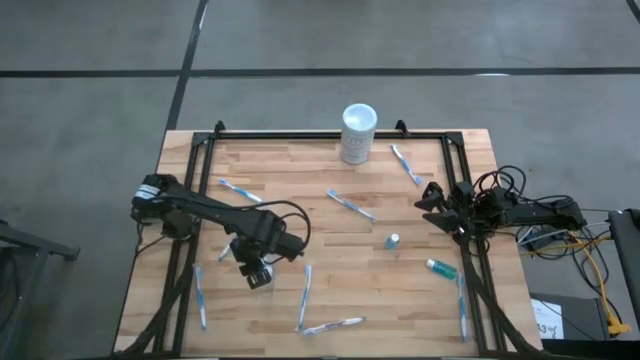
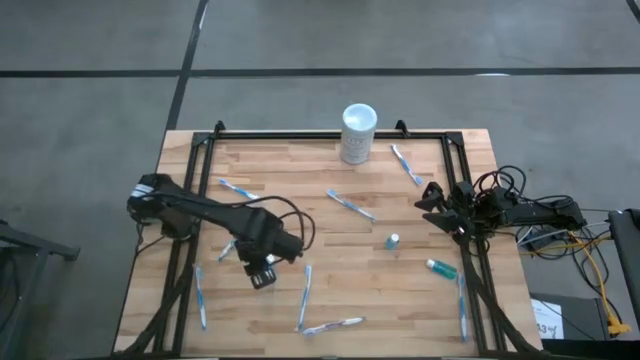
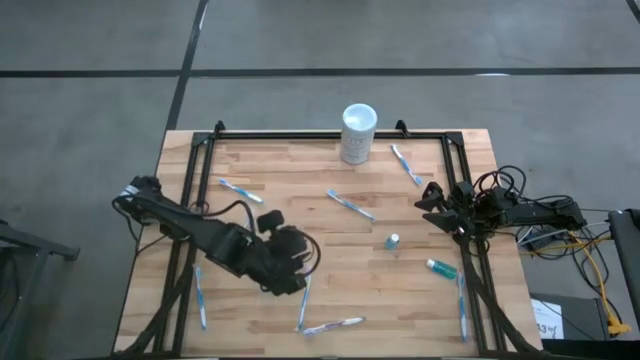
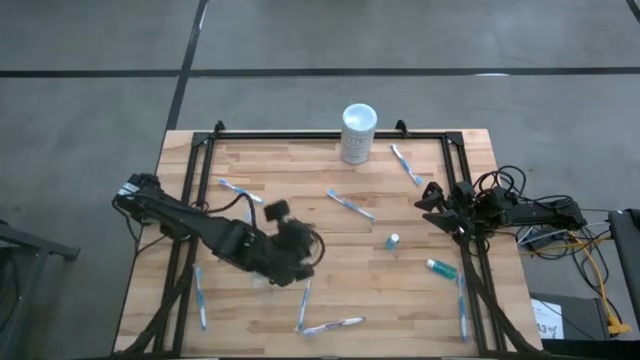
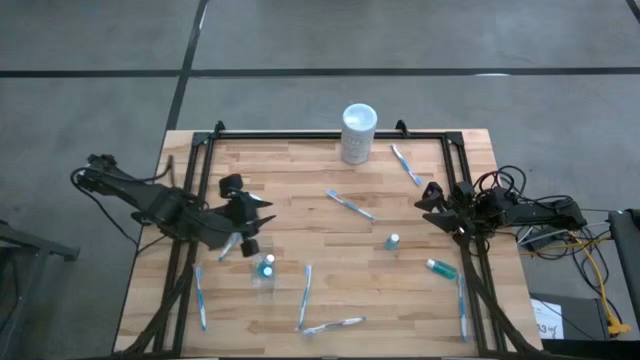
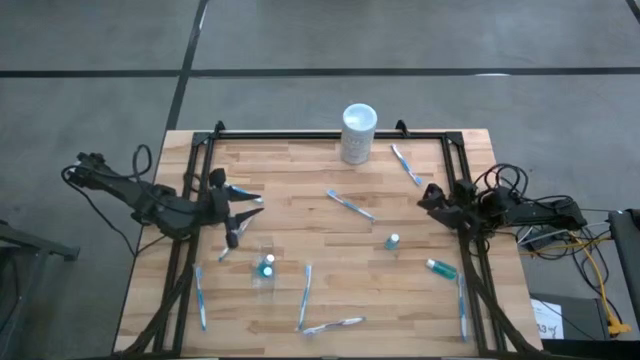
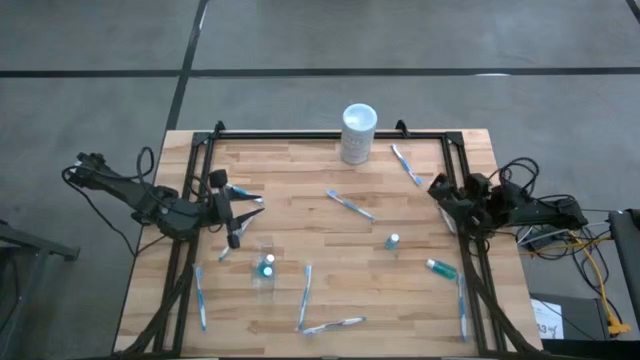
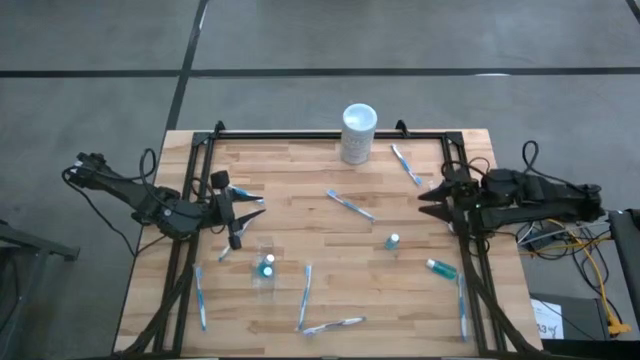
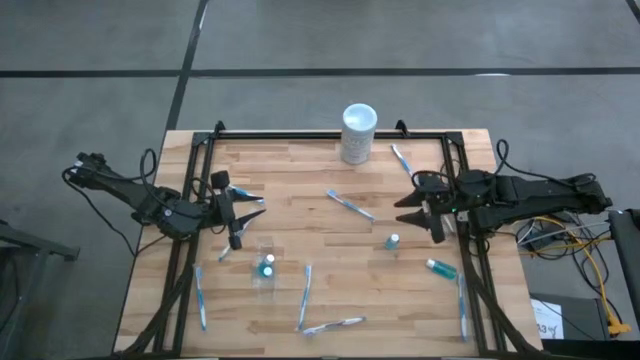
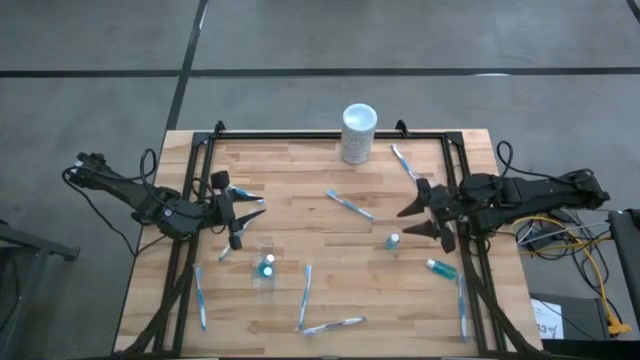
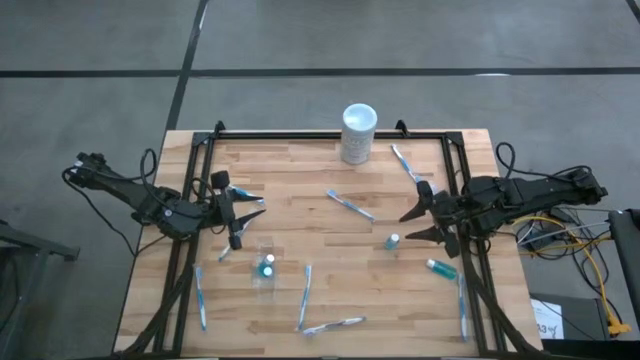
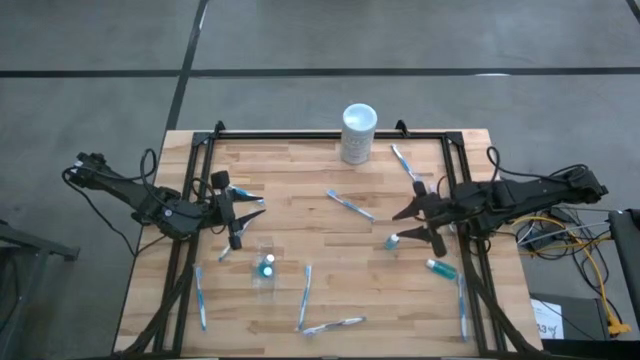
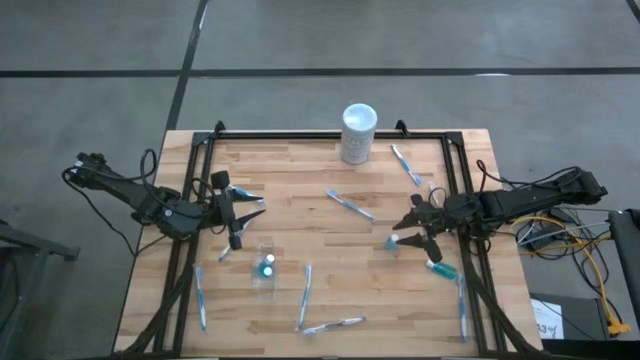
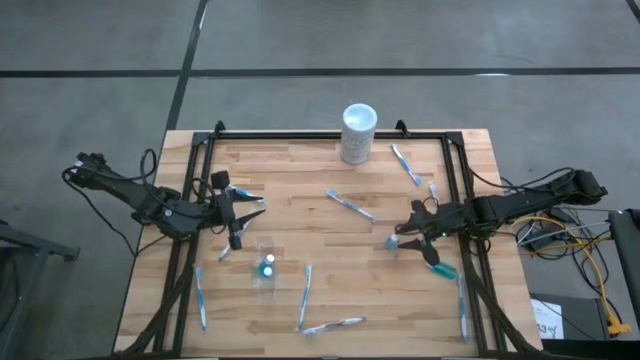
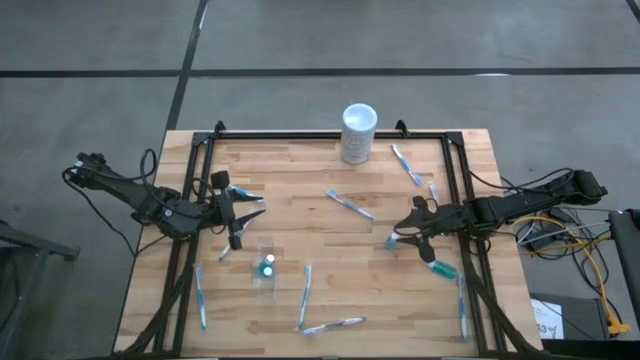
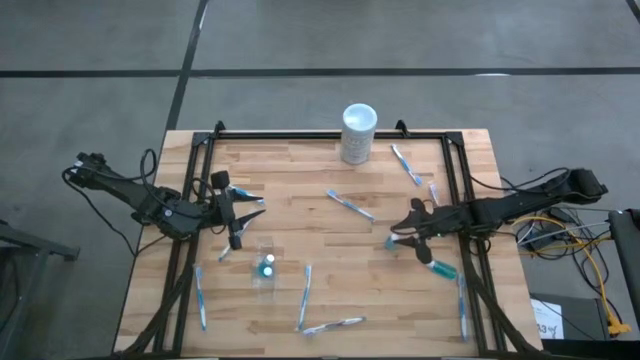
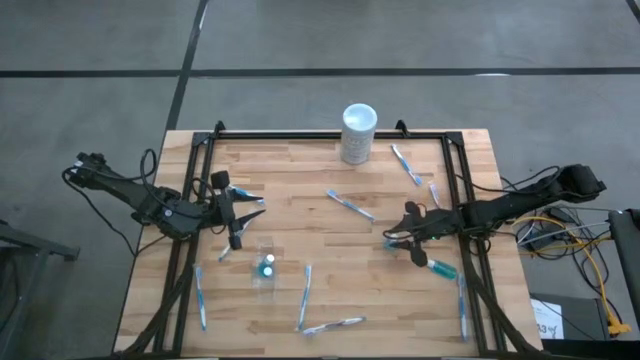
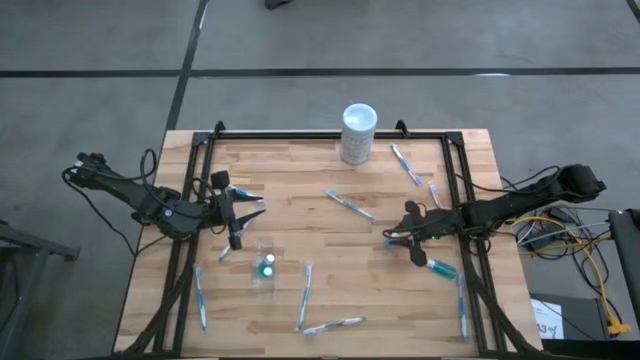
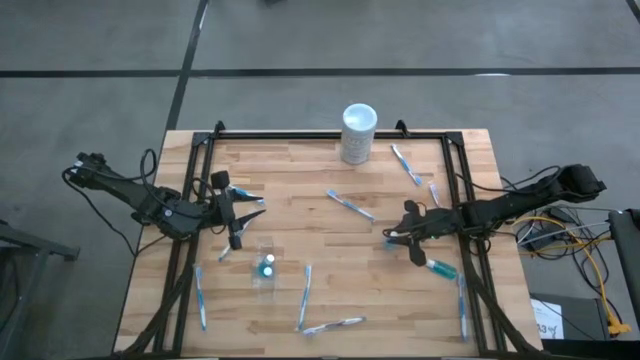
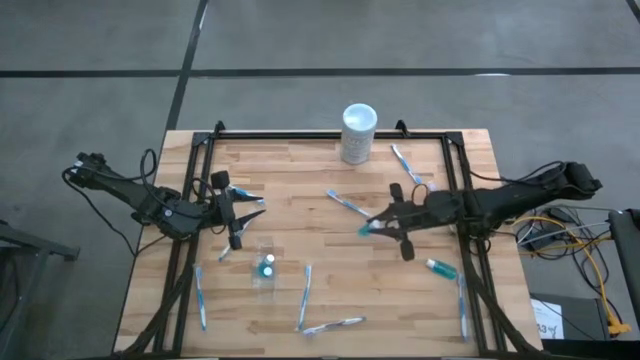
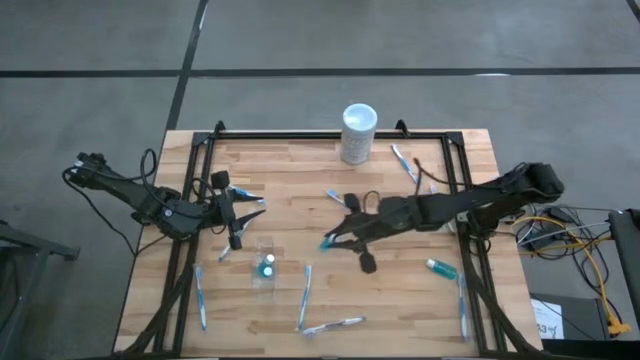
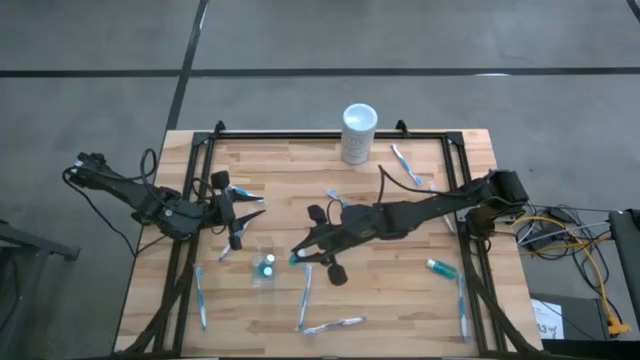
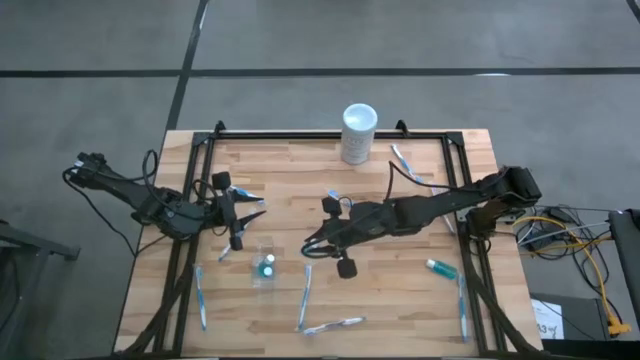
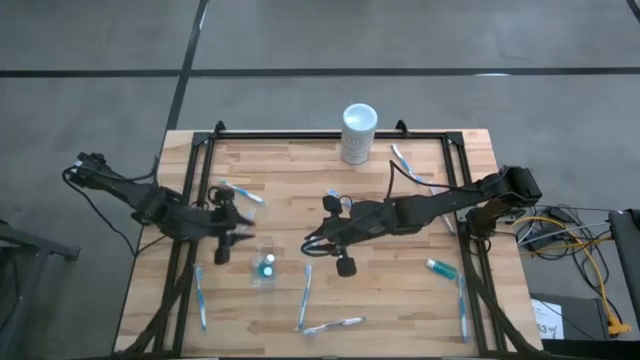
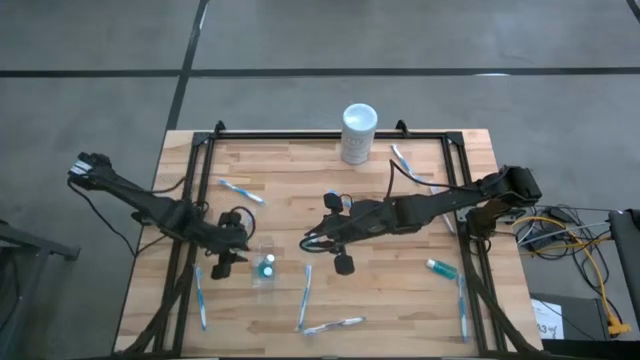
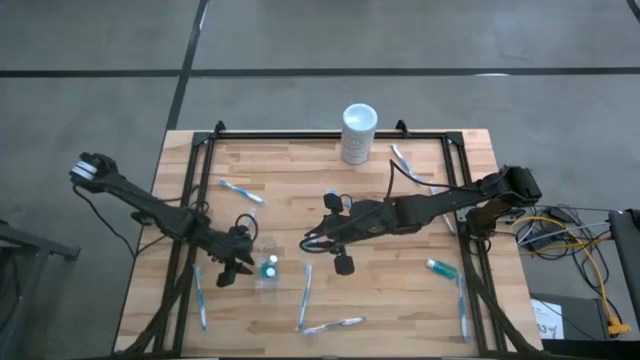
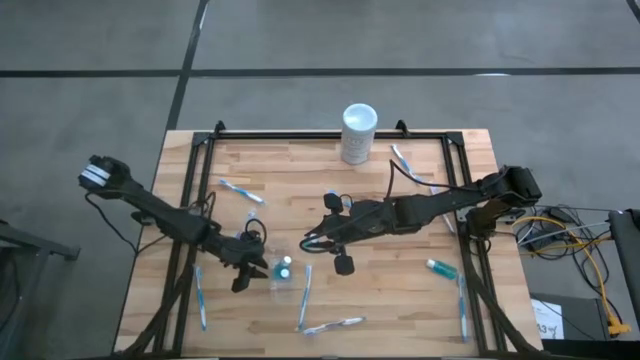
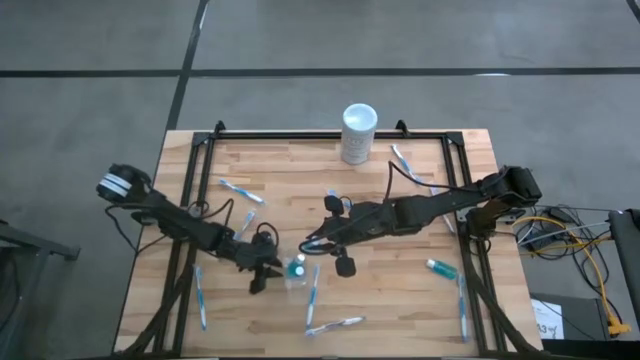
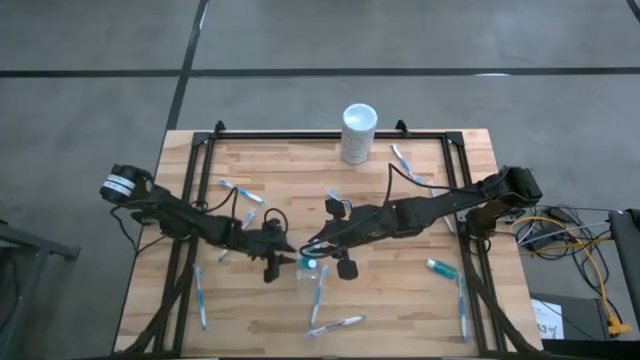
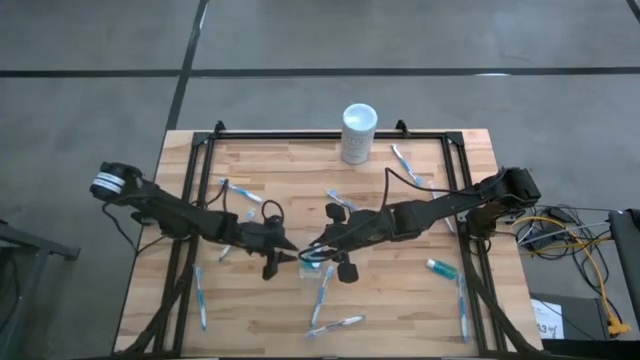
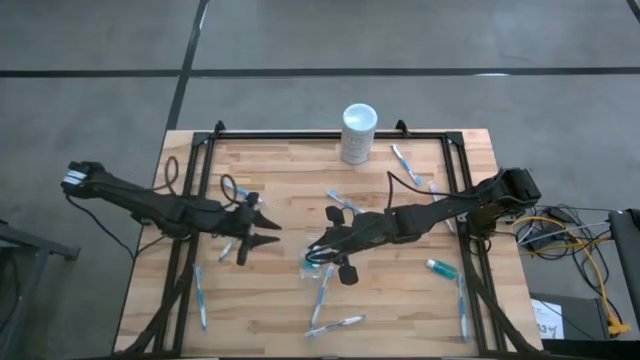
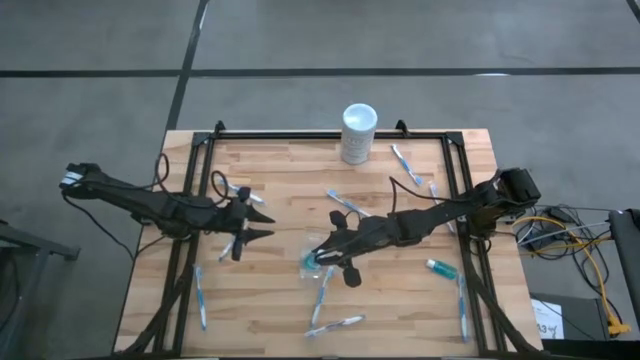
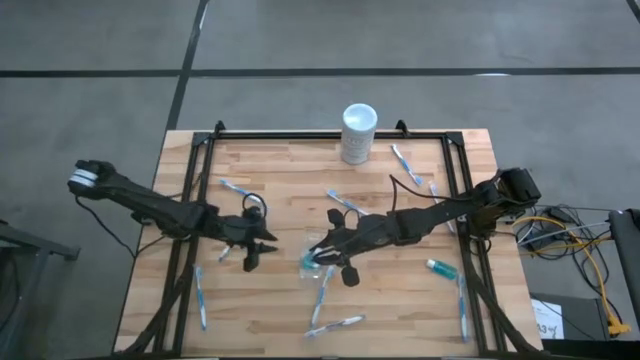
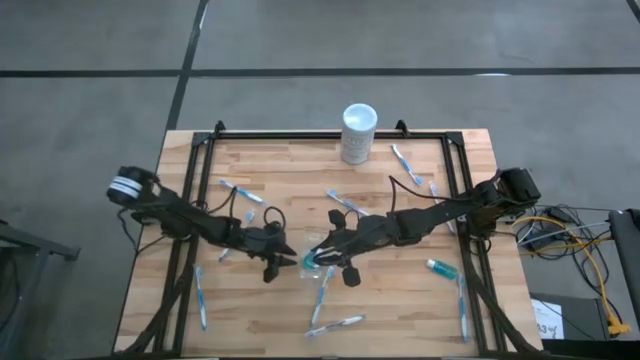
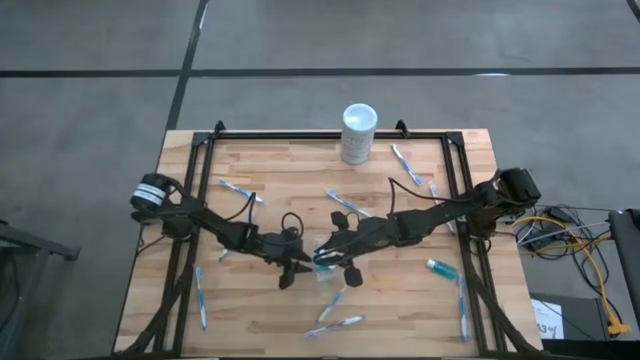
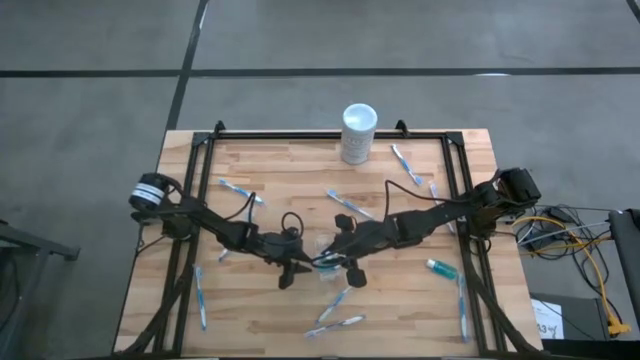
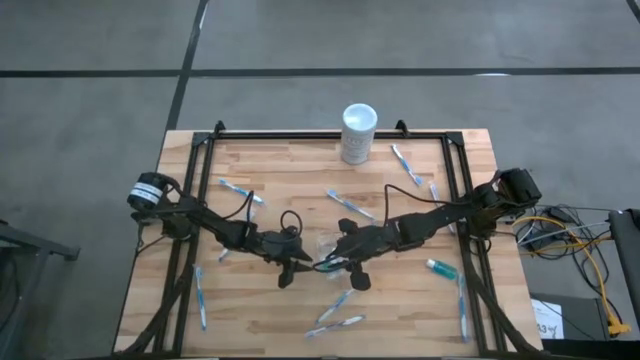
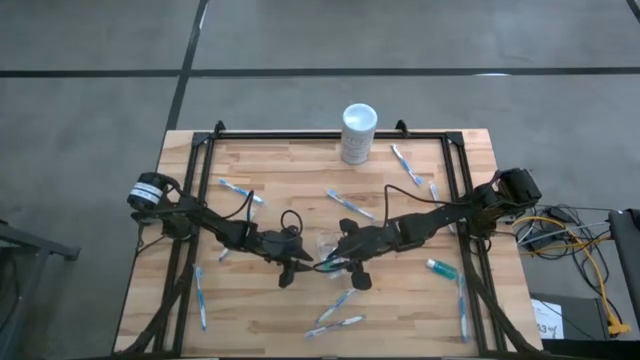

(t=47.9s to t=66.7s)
Task: Pick & Place toothbrushing station
Put the blue mouthwash bottle into the transparent organizer

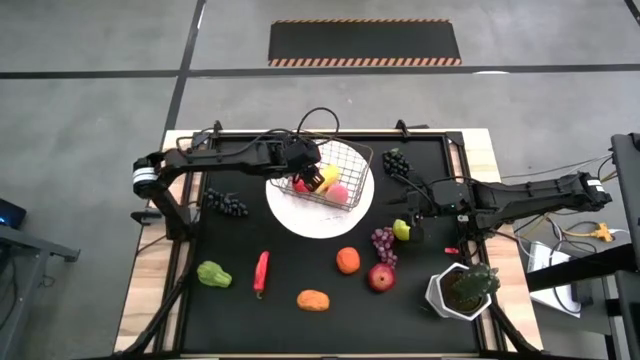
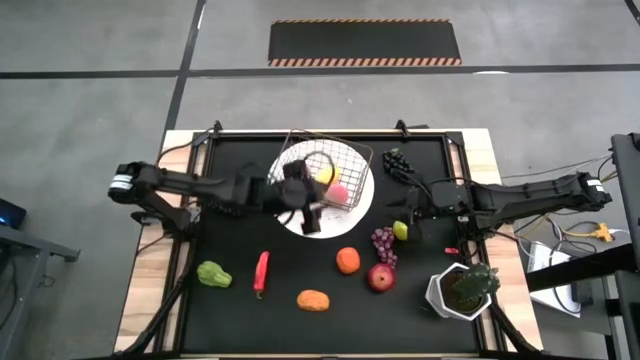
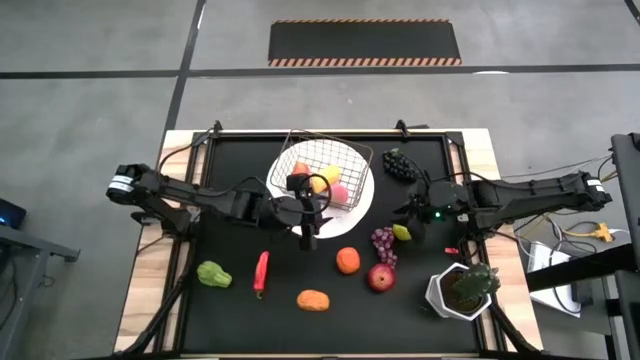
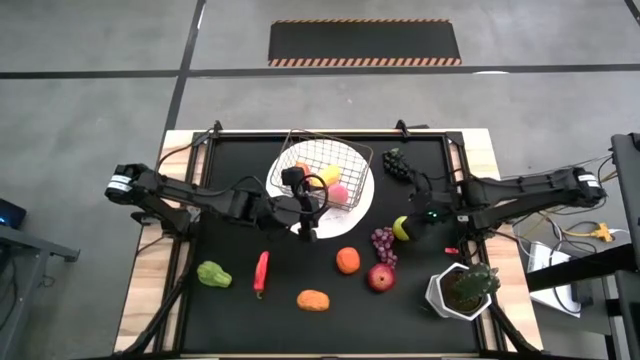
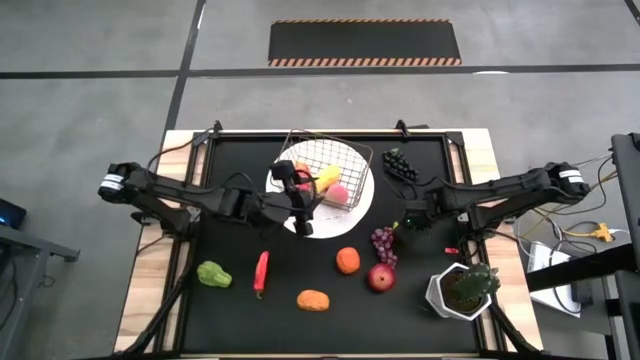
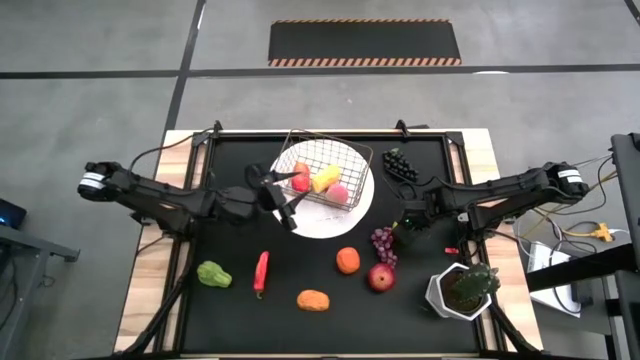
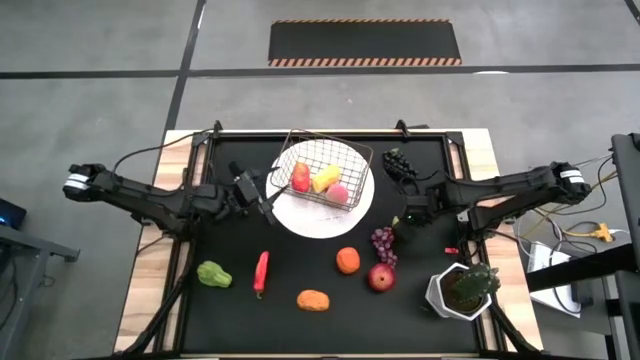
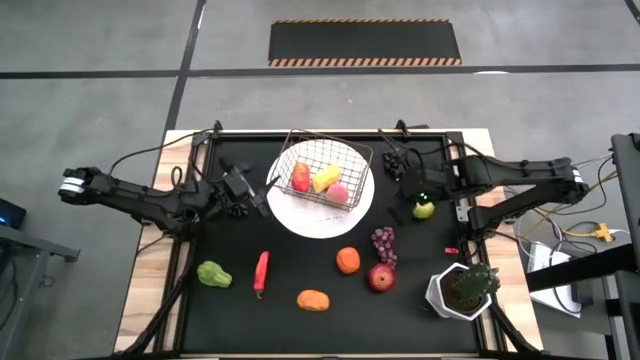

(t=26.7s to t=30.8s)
Task: Build produce basket
Put the green apple into the silver basket
